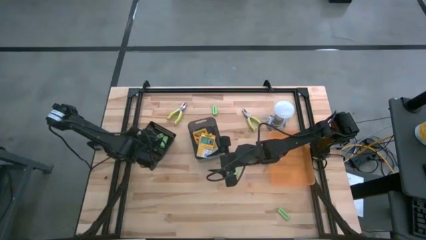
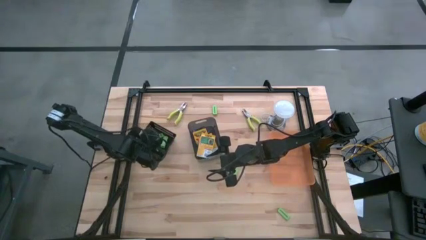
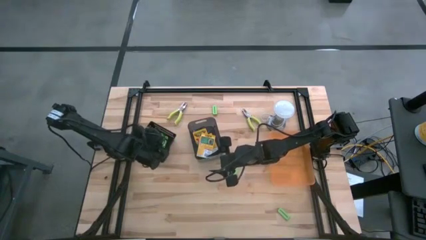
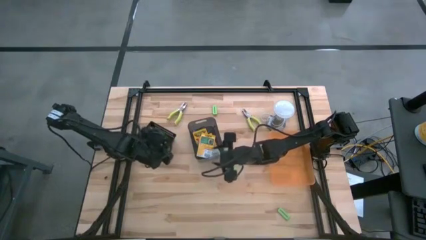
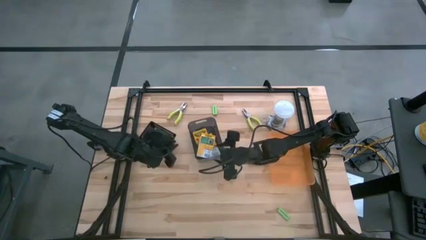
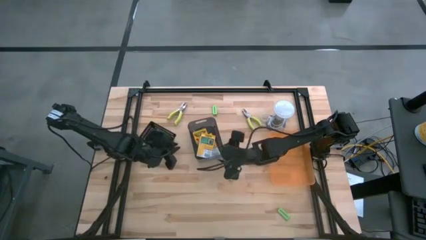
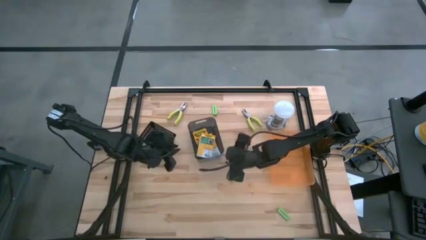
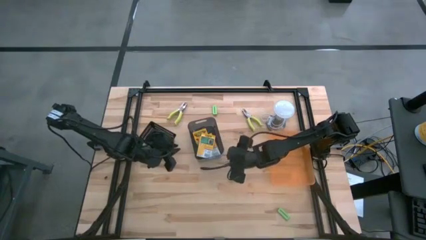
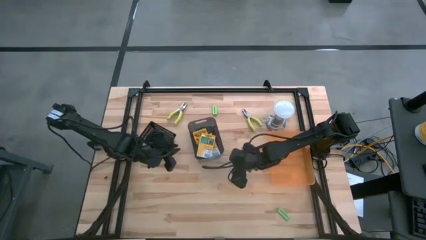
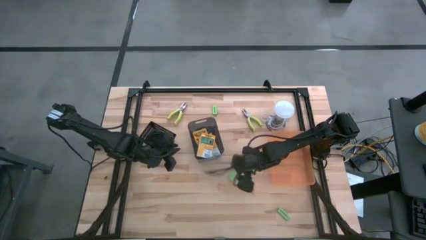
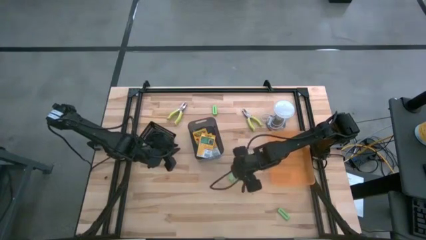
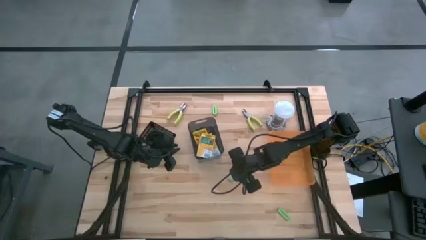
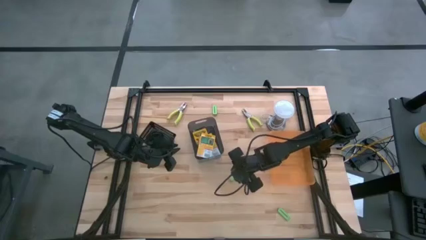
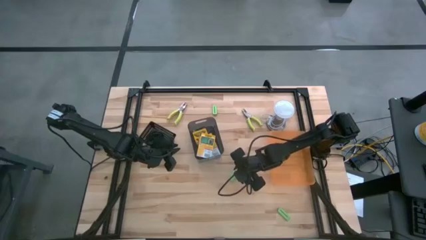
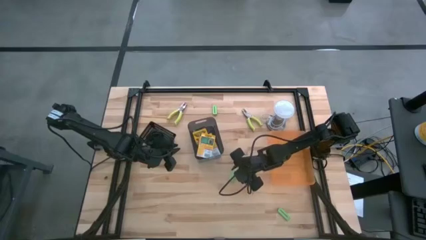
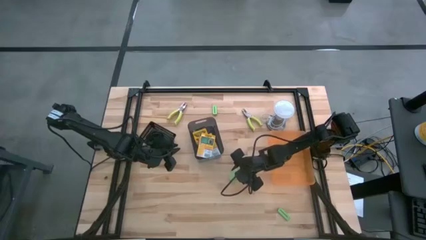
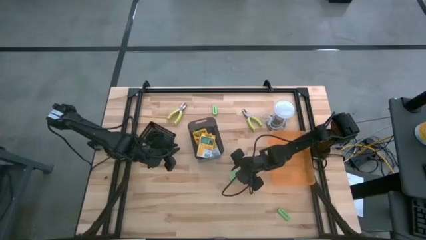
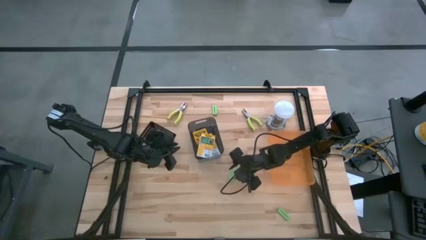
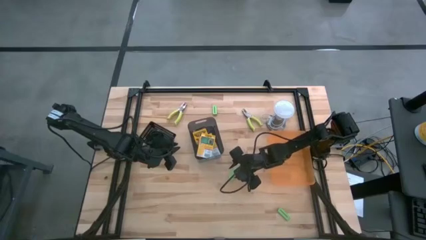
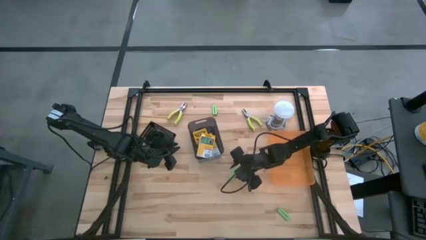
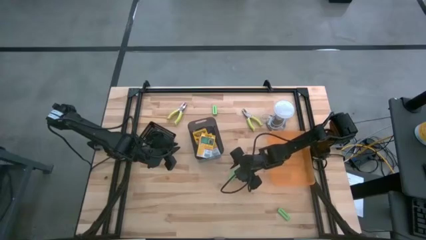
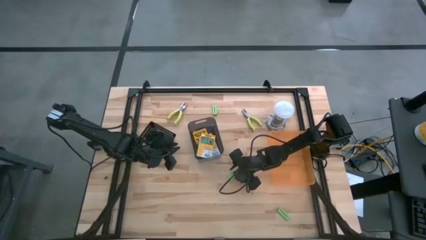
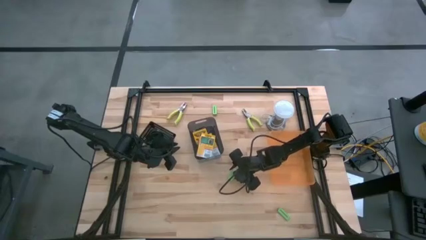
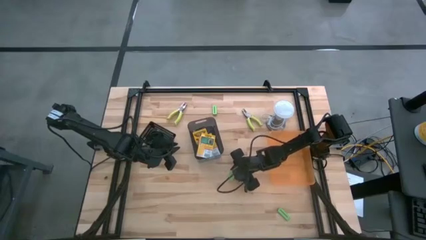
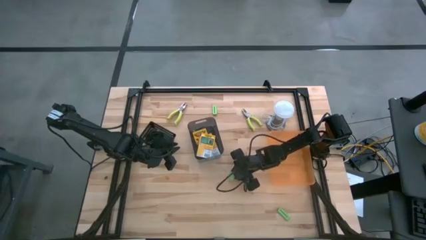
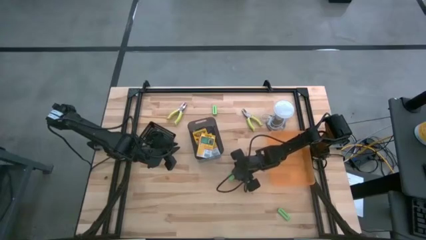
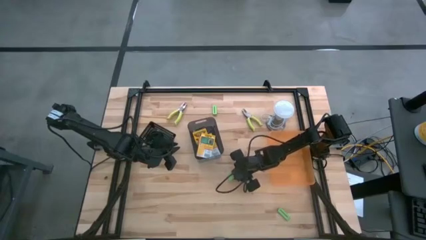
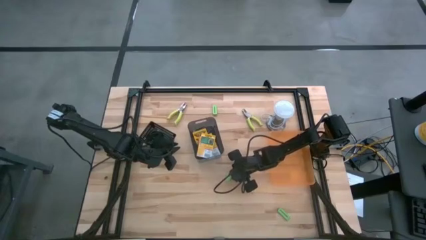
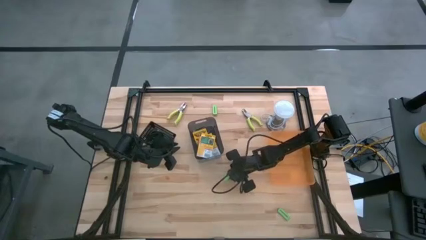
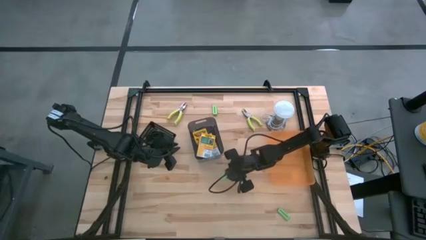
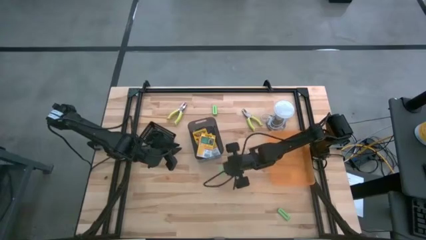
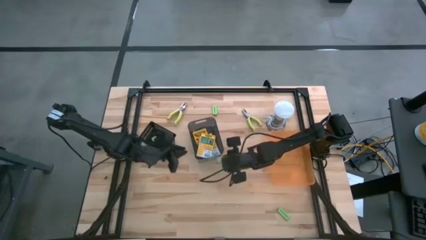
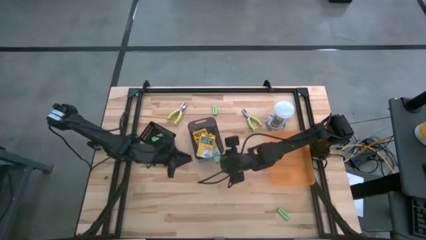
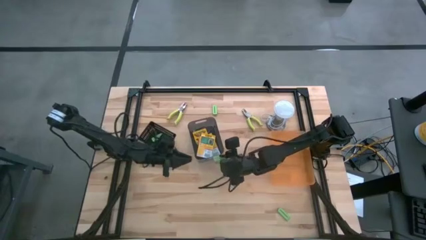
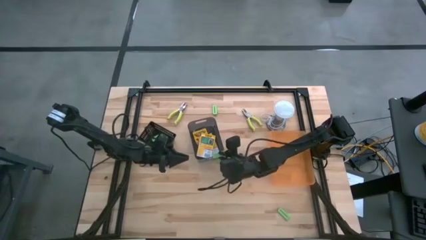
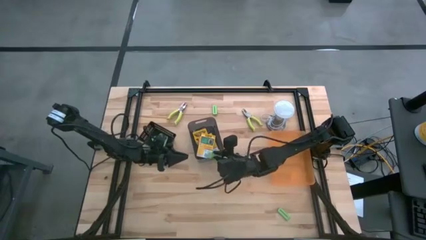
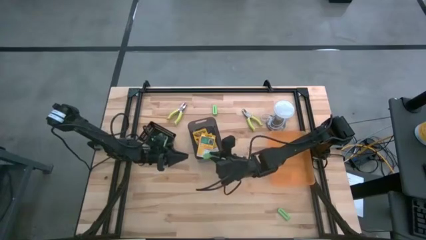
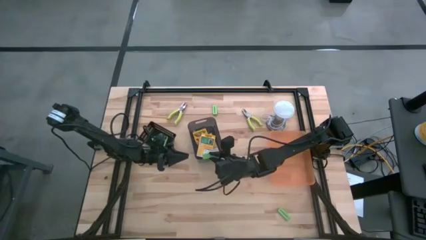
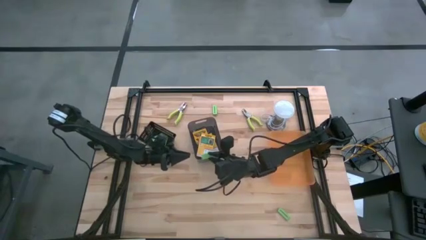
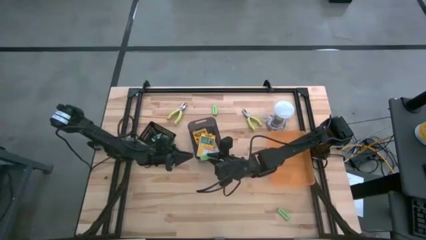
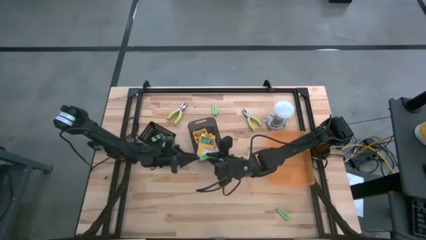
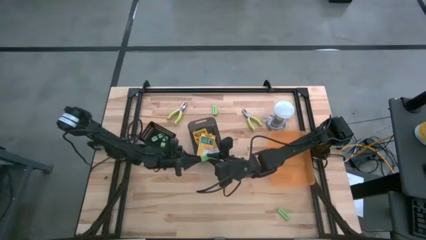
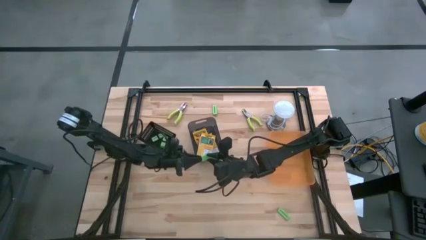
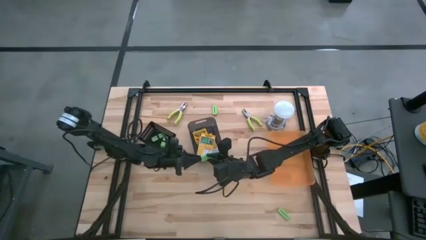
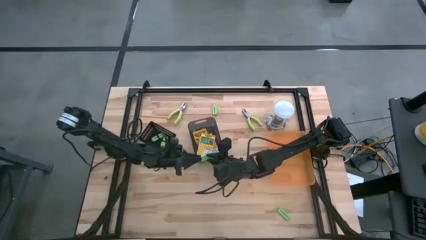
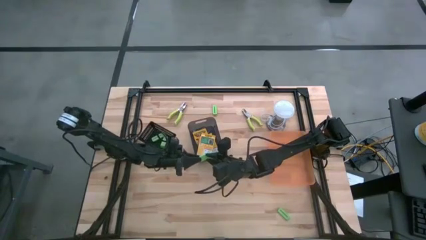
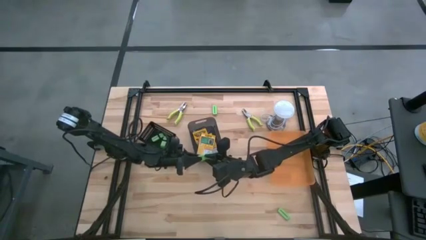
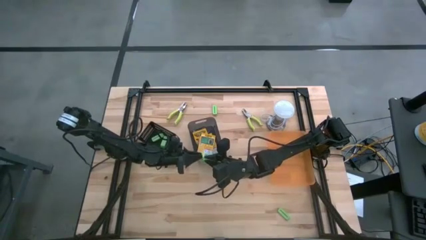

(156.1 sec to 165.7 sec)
Task: Pick & Place School Supplies
Put the middle light green eraser into the black bin

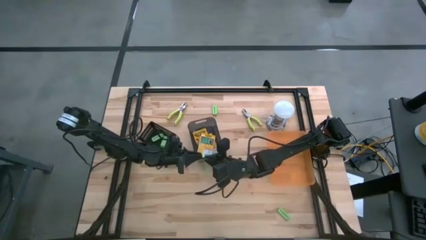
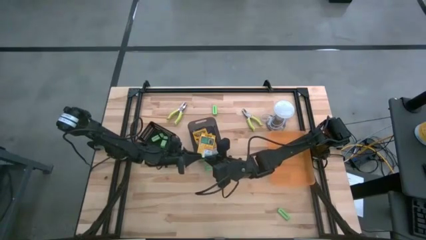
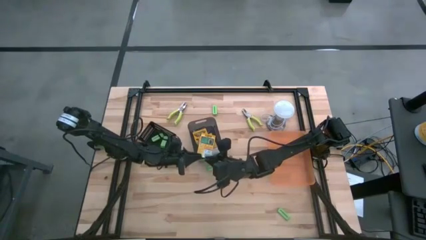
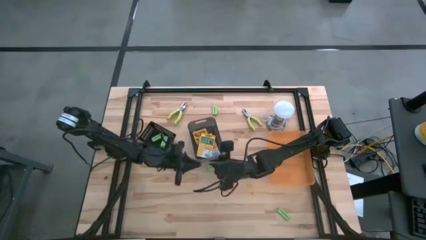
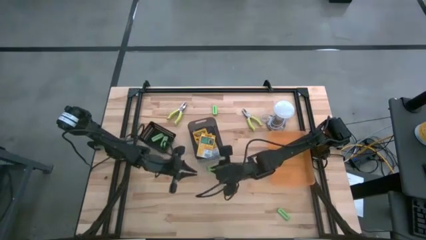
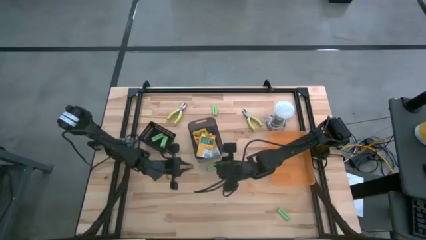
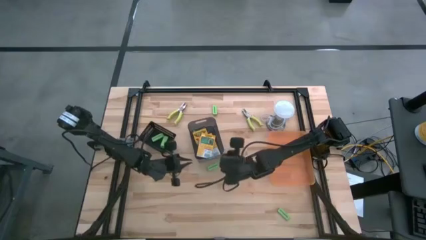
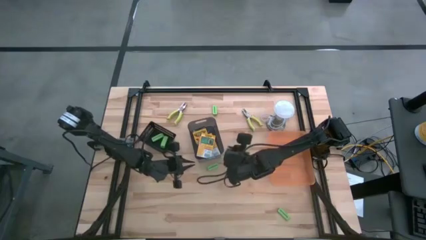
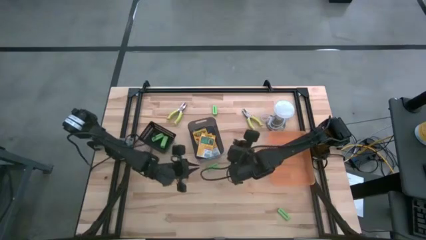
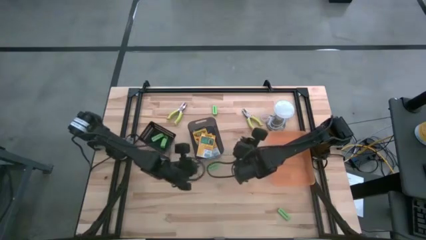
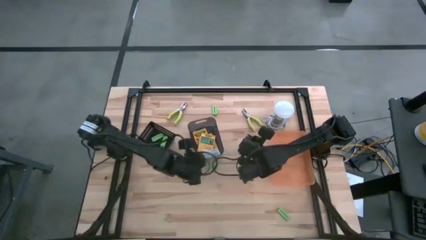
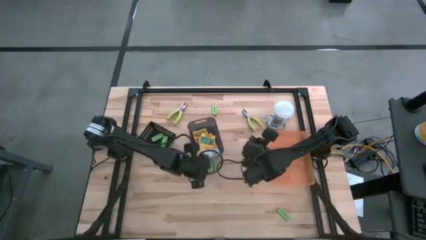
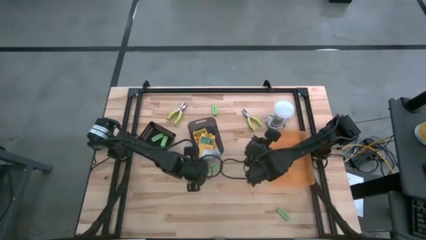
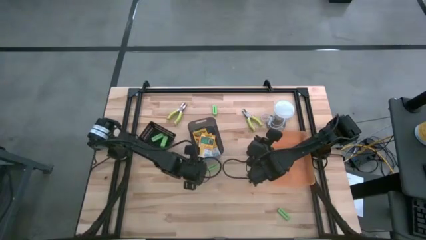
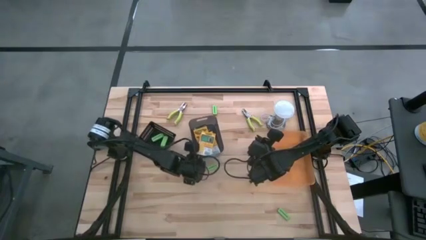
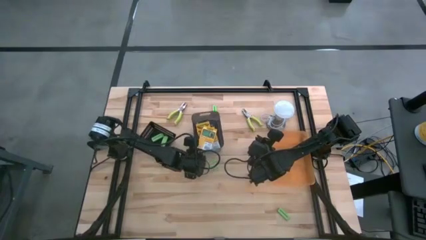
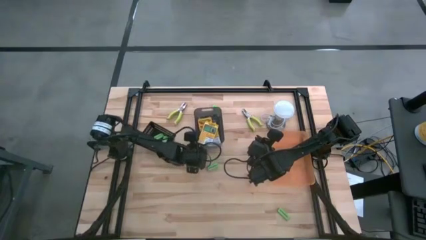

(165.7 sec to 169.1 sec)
Adjust the black transparent bin

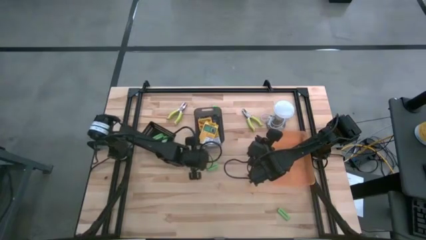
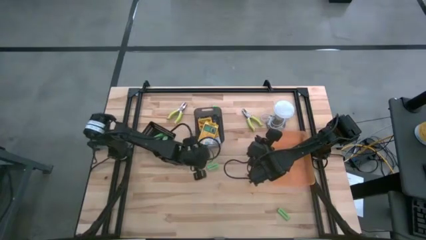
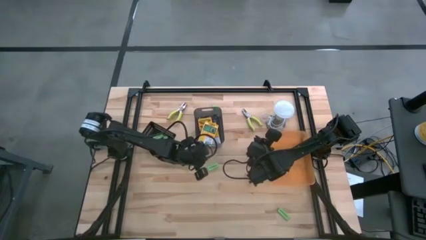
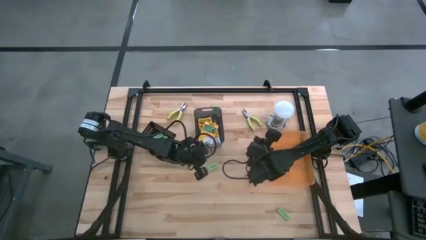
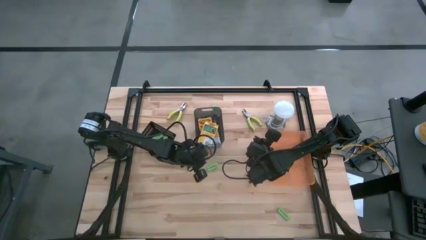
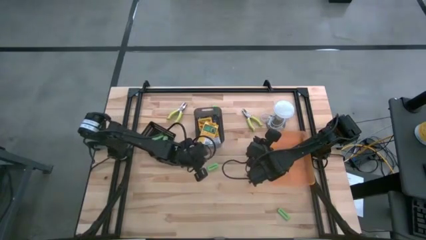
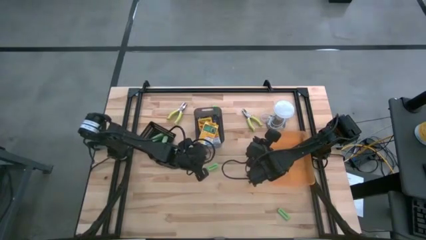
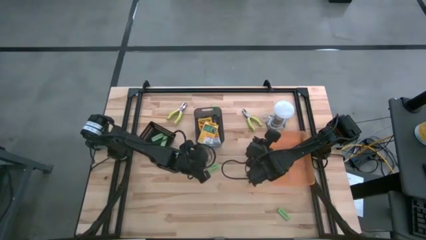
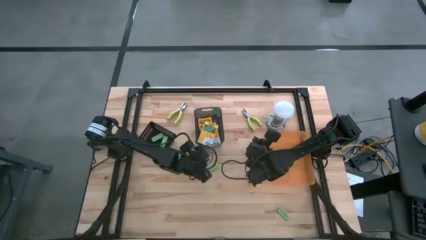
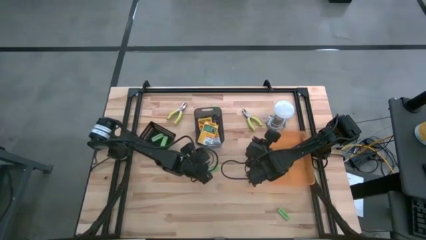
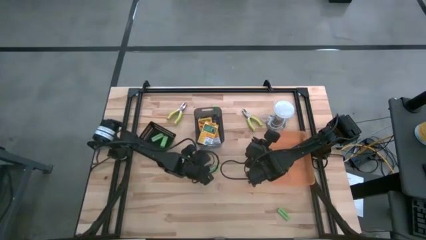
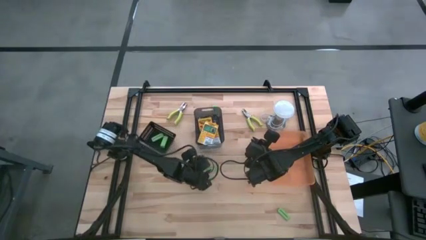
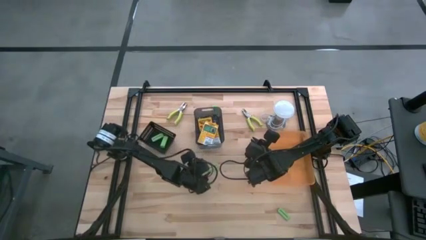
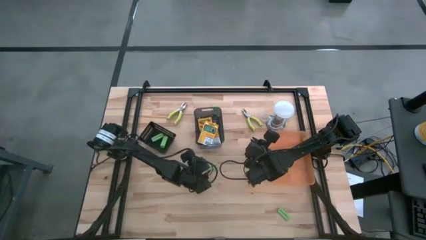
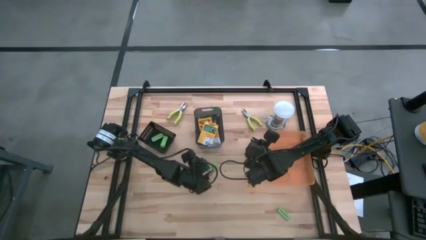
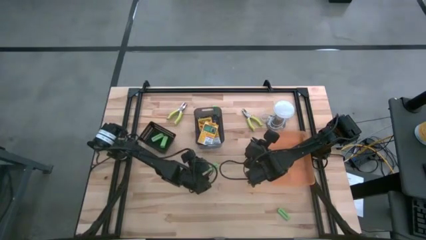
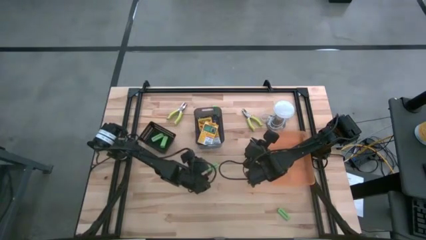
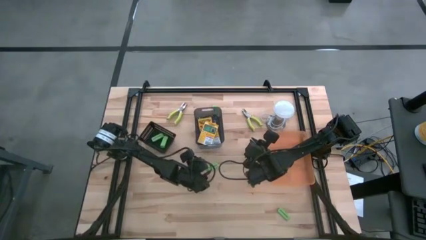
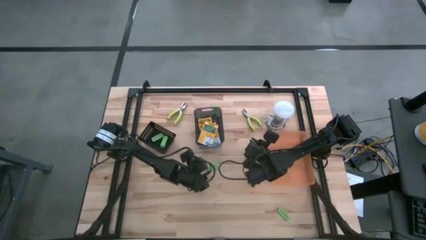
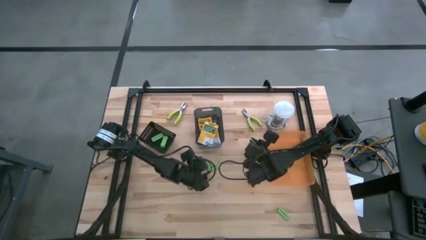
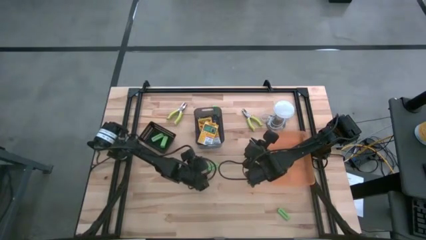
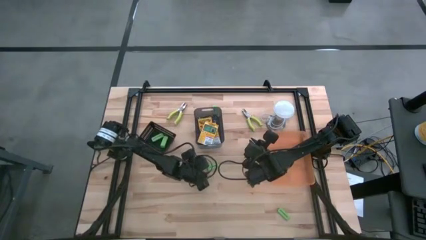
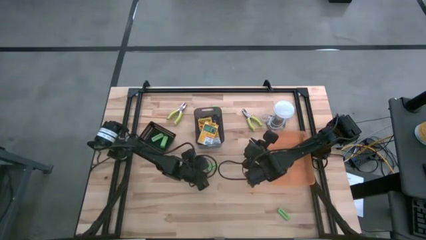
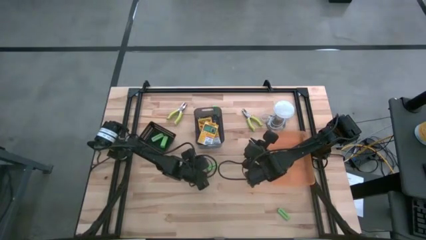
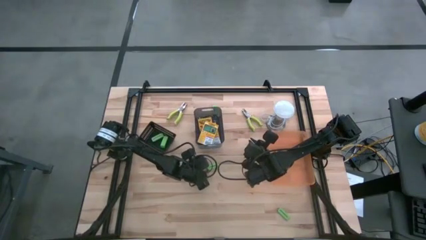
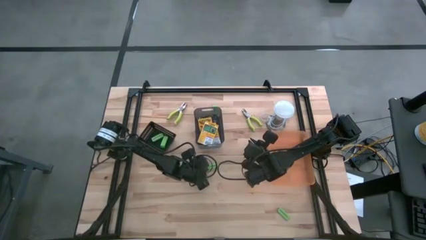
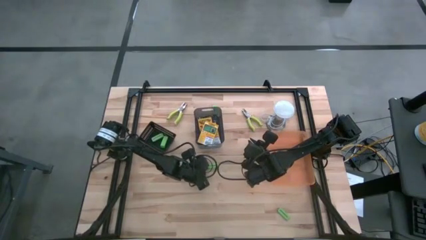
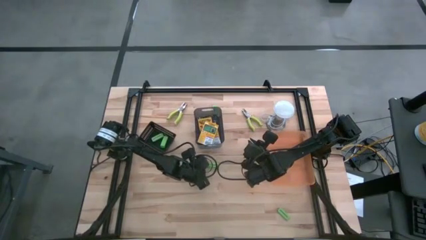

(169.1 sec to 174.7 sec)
Put the middle light green eraser into the black bin
